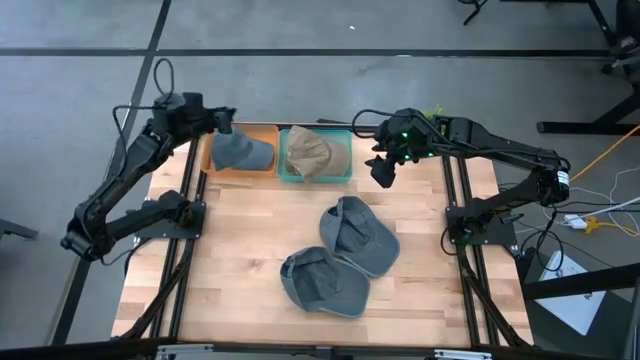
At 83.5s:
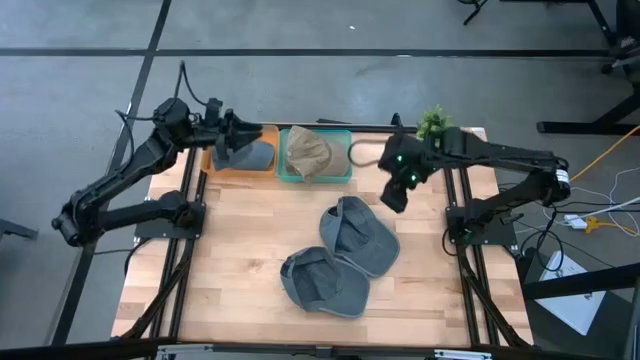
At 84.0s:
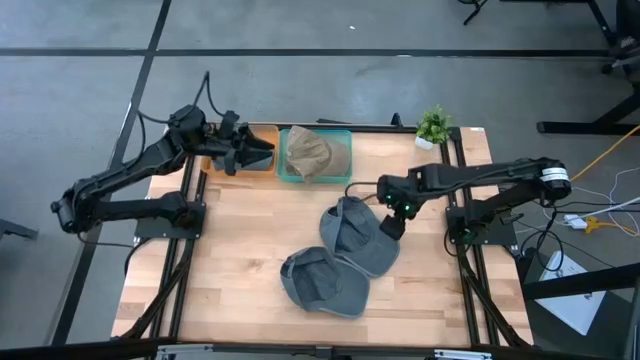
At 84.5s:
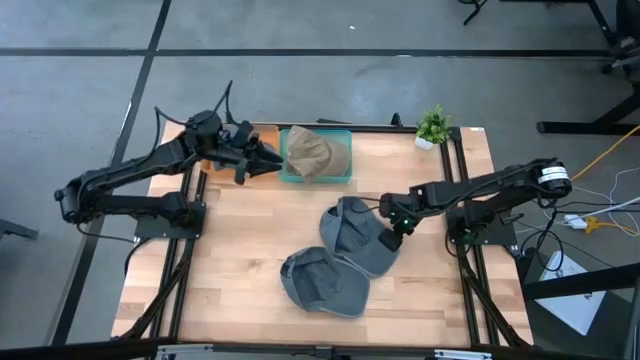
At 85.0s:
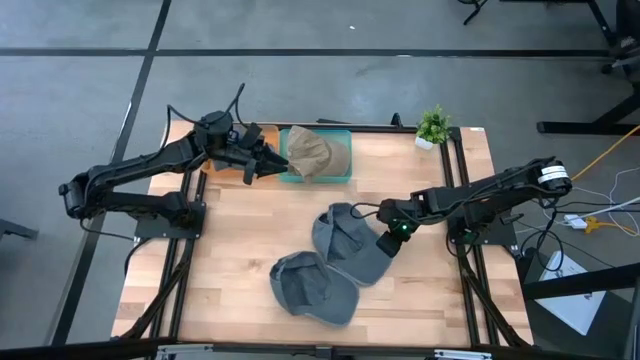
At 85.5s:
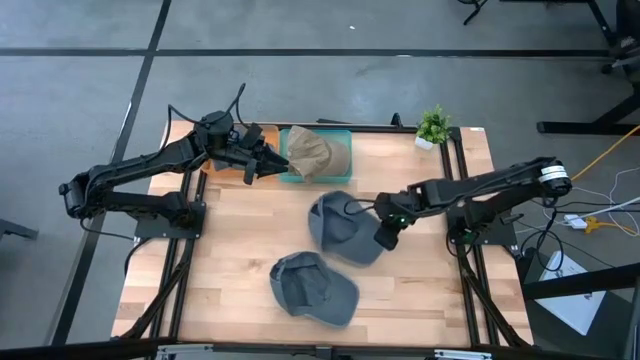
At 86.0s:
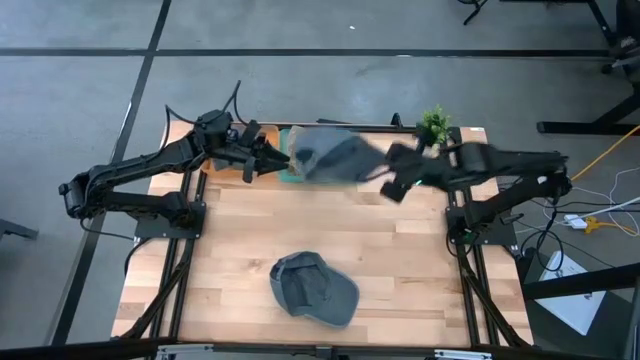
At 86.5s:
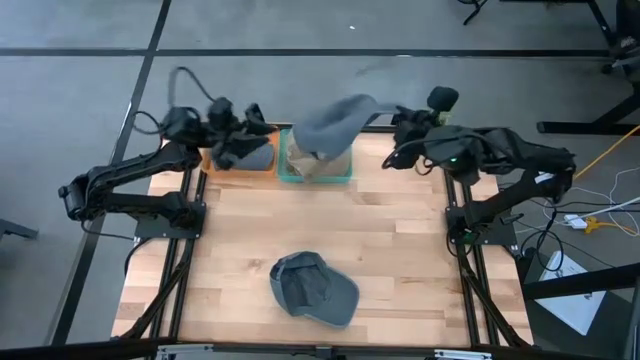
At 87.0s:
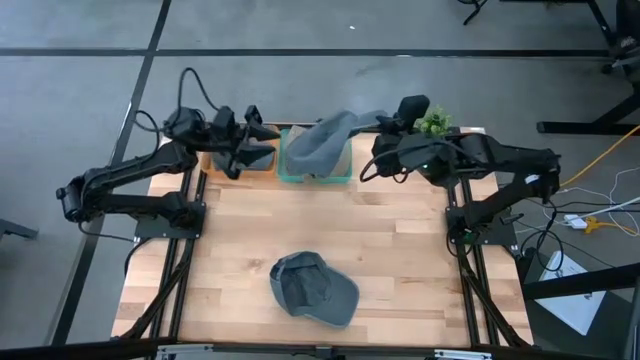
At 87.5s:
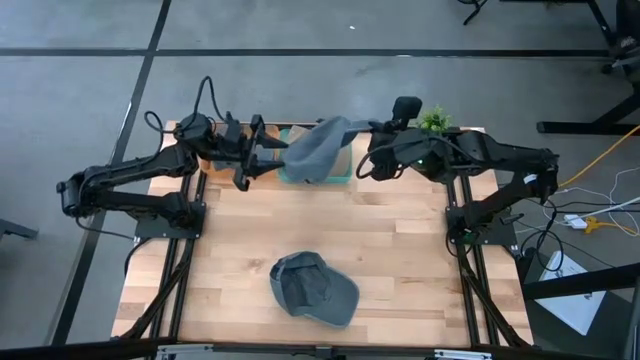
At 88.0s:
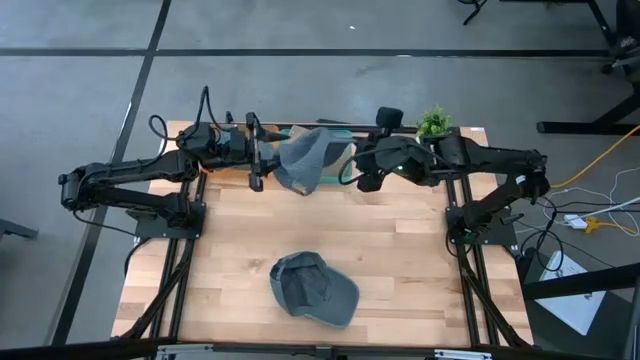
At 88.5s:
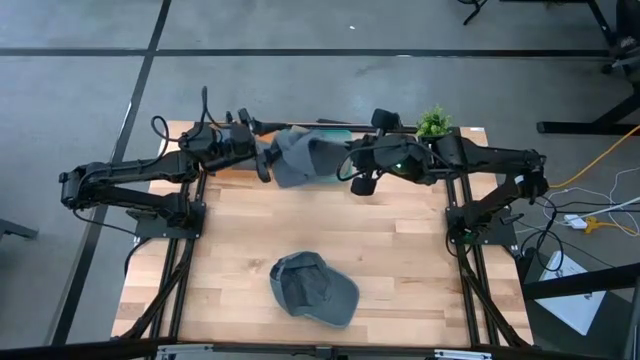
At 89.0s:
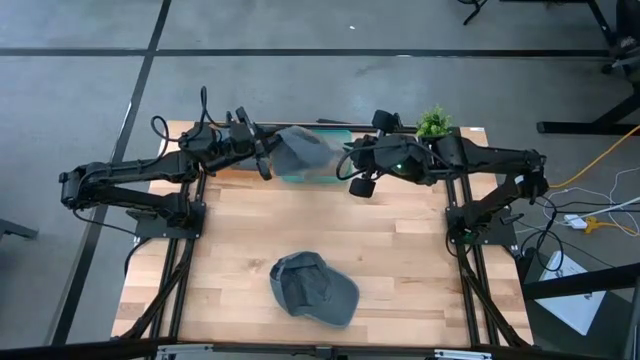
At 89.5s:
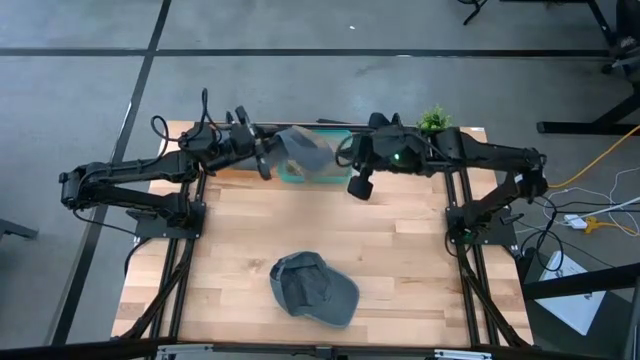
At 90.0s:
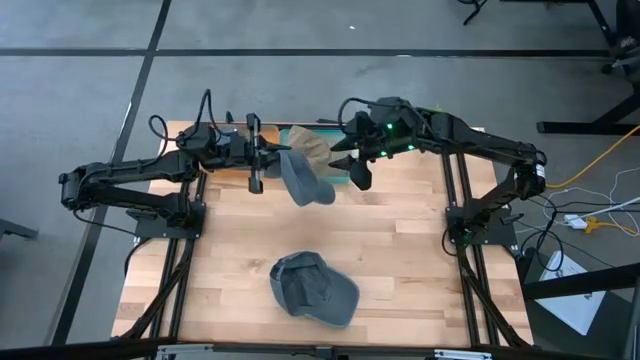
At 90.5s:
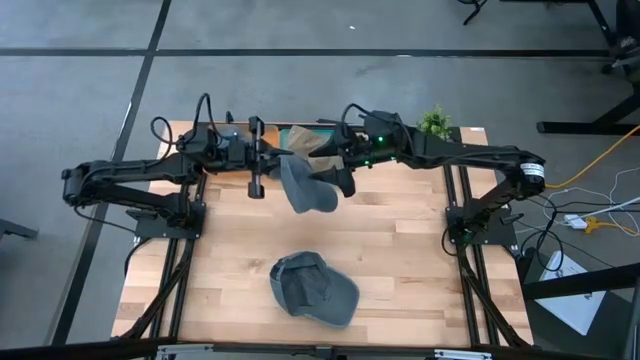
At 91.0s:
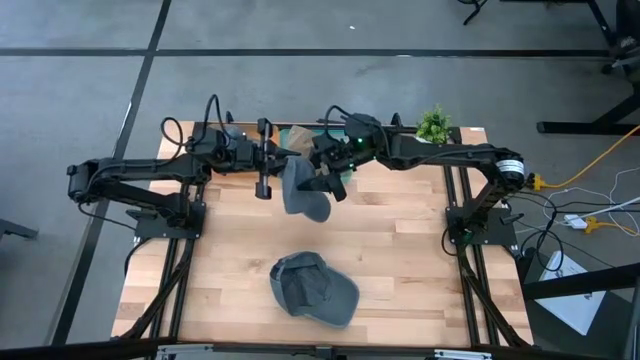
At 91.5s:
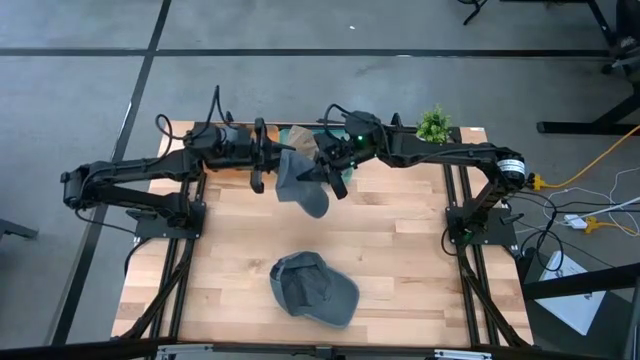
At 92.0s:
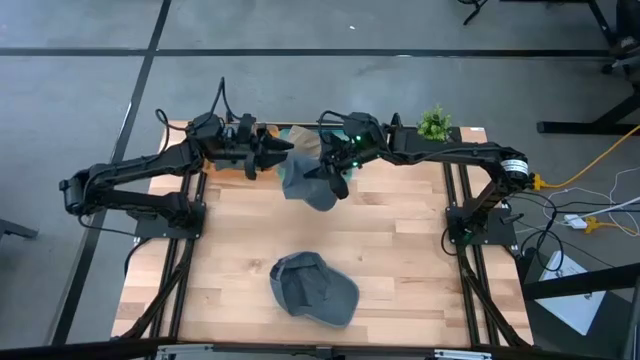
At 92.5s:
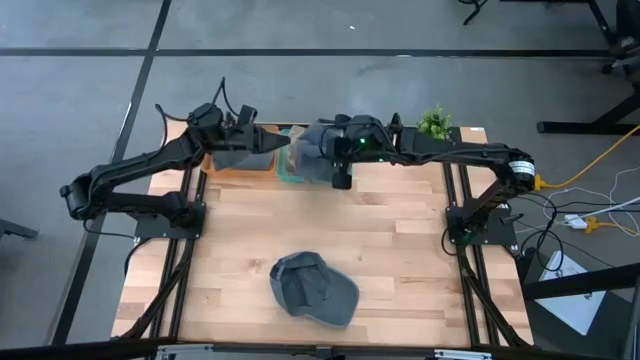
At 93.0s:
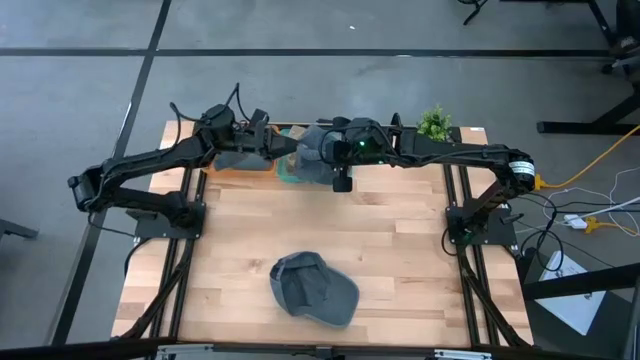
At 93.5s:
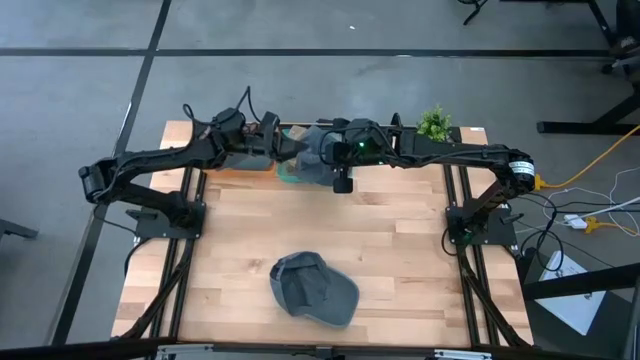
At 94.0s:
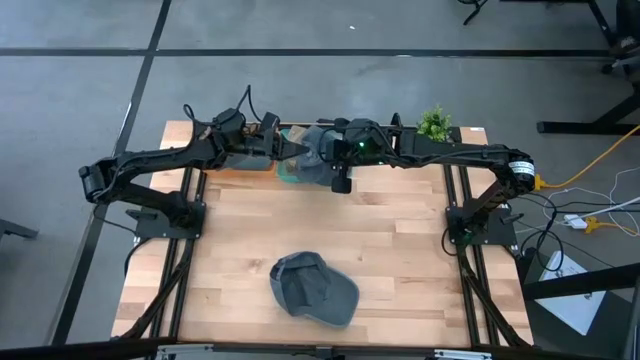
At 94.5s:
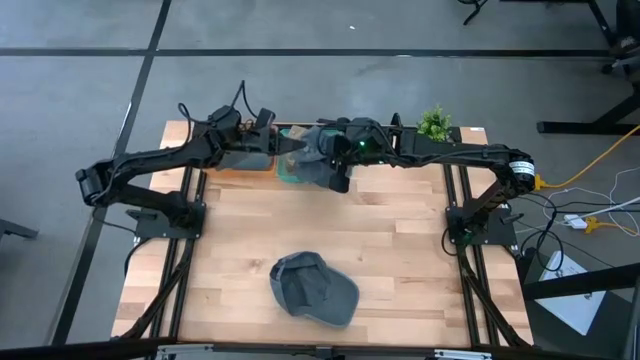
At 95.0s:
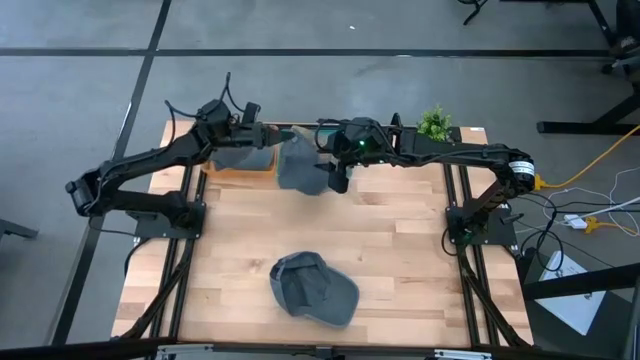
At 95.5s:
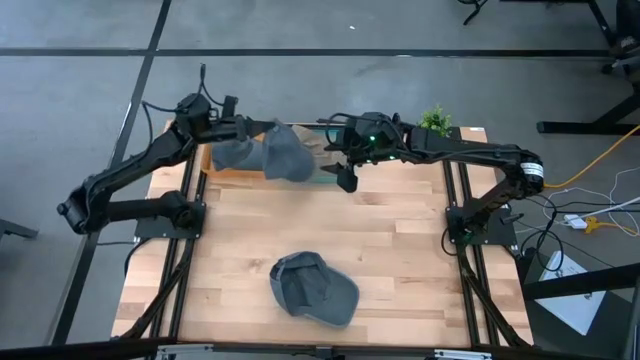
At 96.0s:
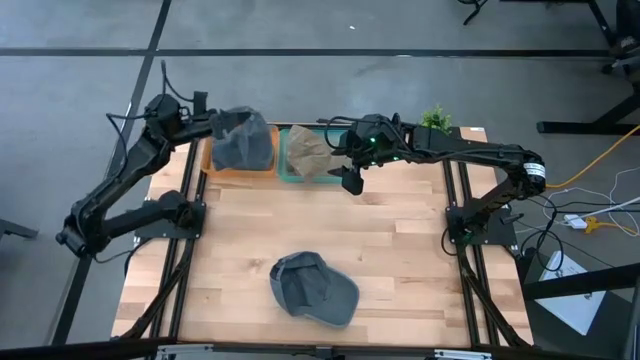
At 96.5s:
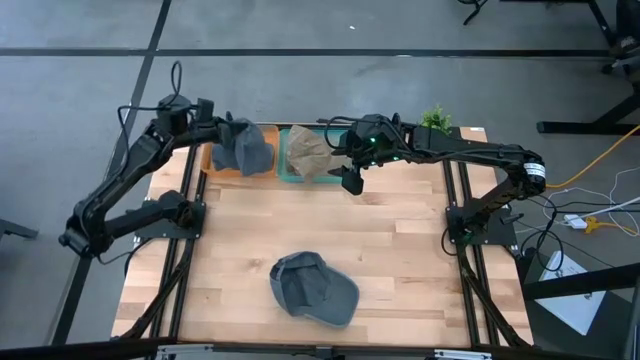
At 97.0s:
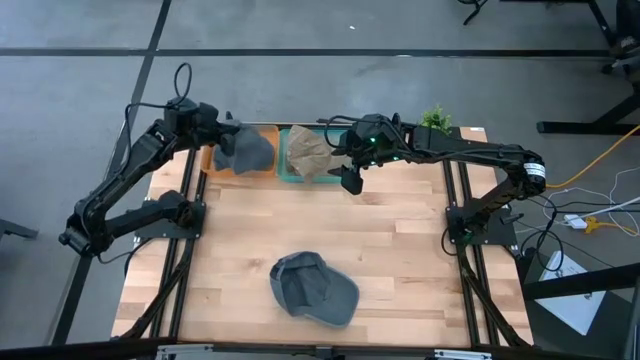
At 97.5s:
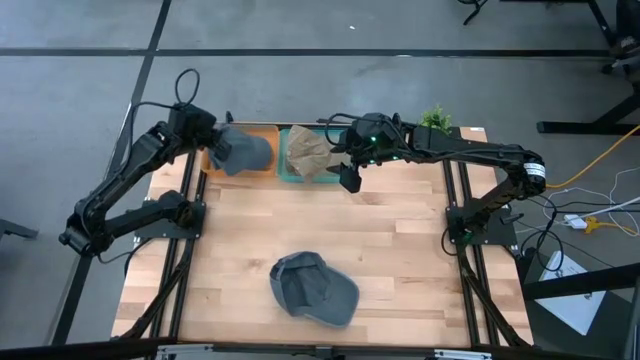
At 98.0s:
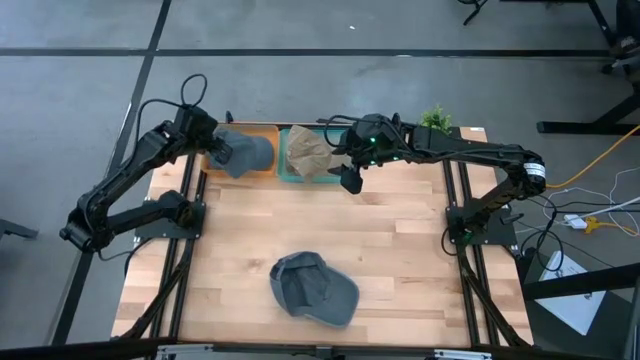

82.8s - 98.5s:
Task: Pick & Place hat
Put the top gray cap into the orange bin

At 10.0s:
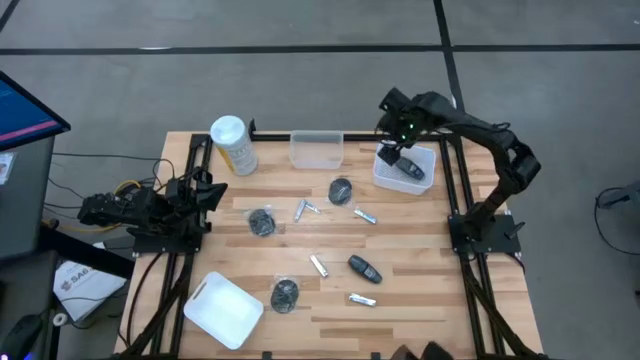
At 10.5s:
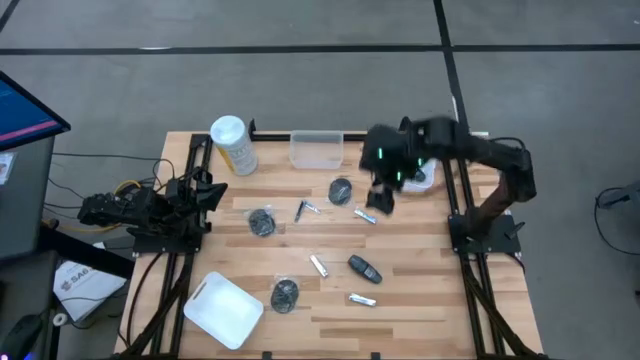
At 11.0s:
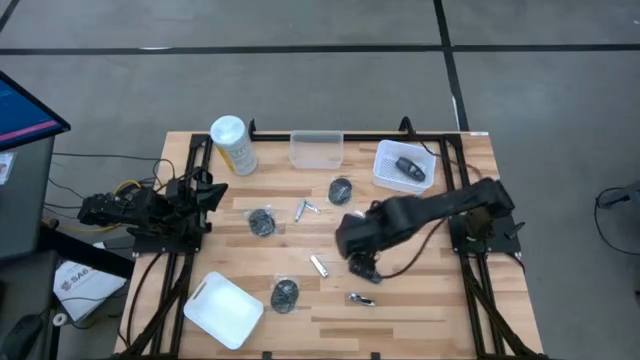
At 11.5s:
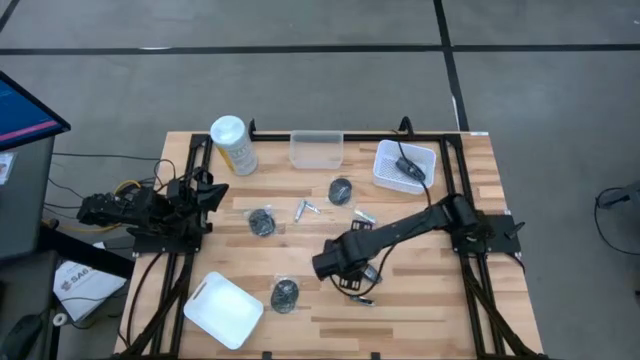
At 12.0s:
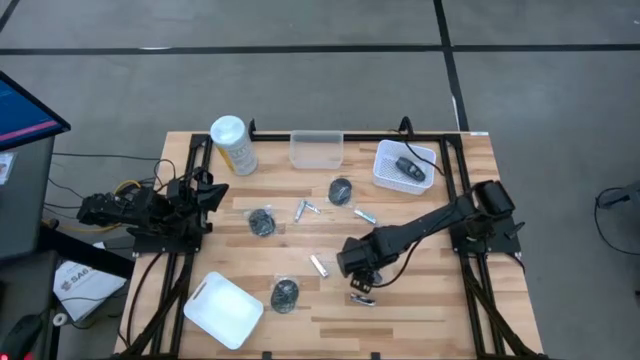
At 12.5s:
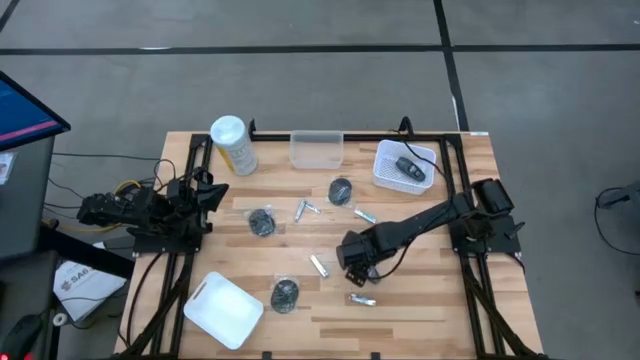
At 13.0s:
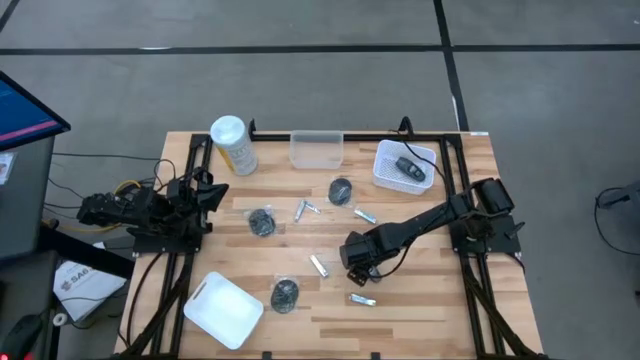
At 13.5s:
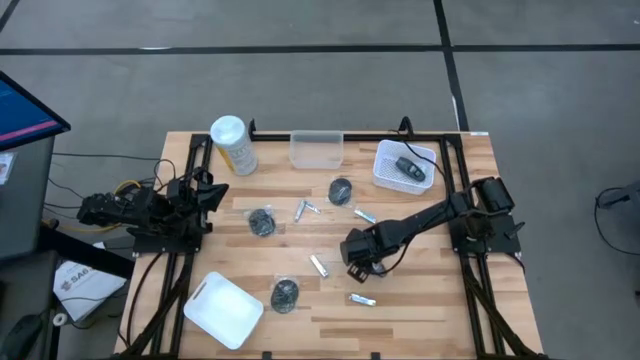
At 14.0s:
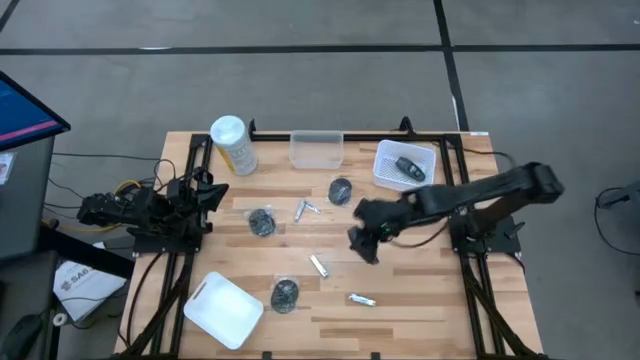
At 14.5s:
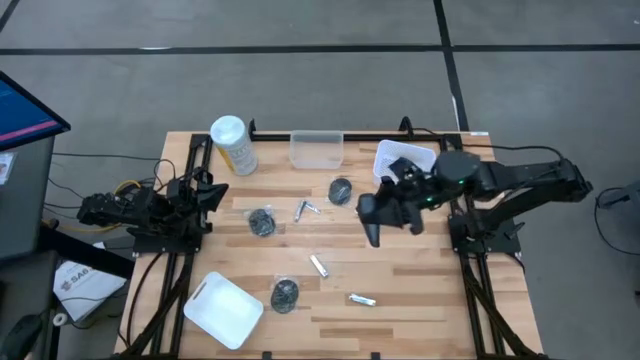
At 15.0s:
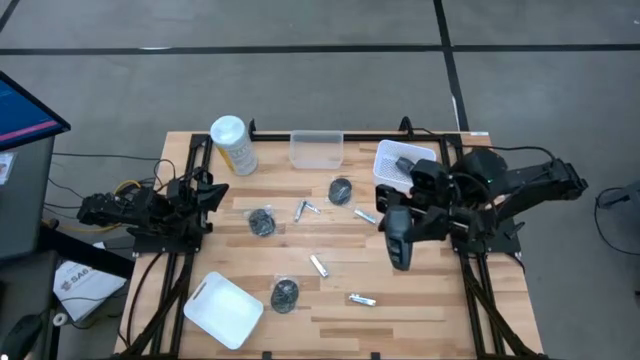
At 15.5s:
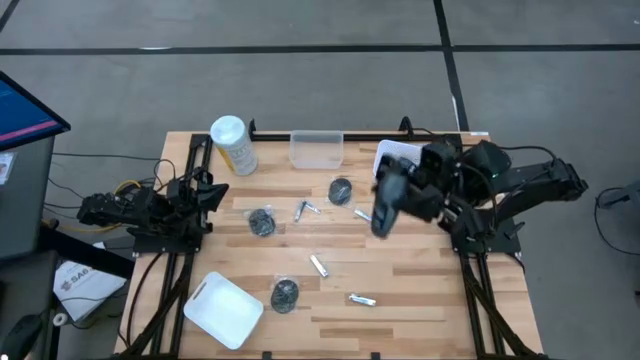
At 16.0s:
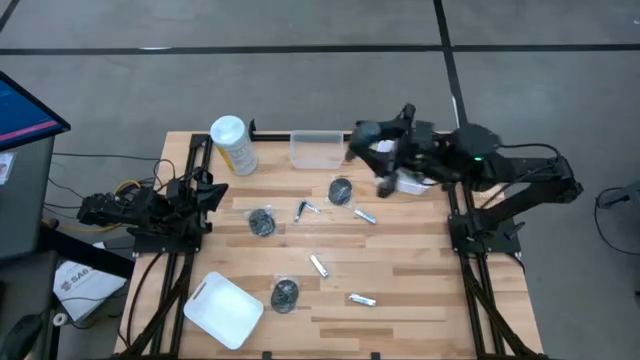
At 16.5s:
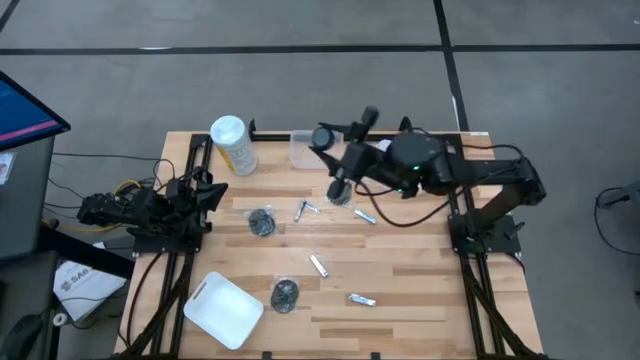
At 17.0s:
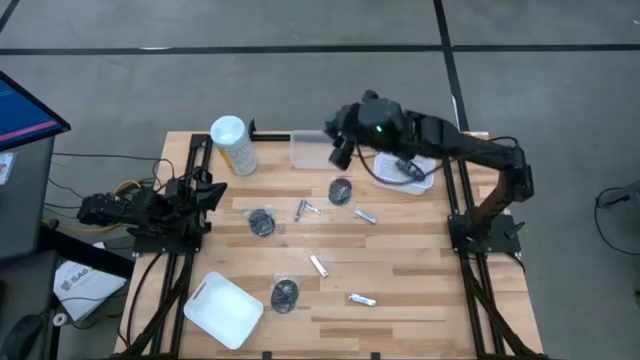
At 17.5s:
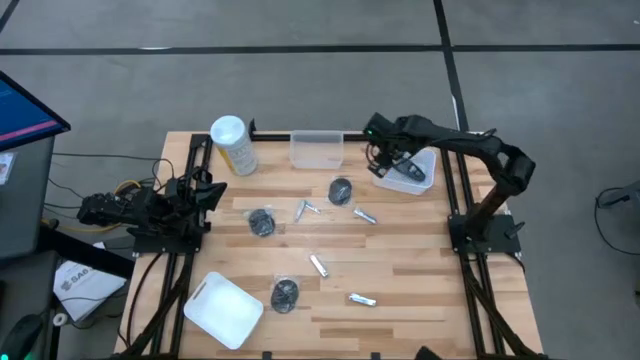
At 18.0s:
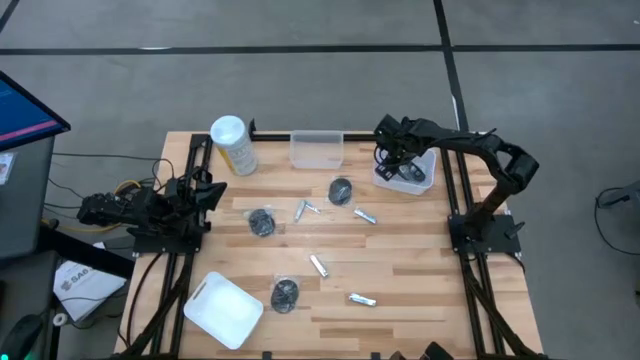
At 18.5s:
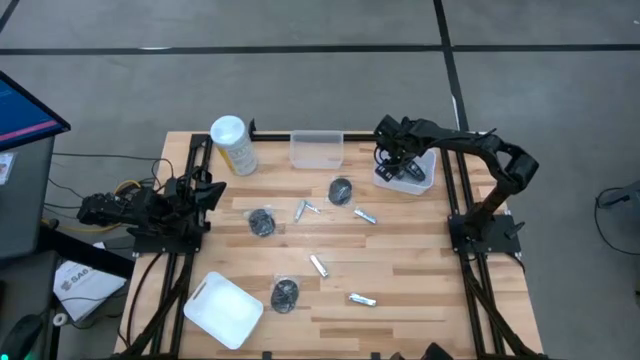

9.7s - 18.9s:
Task: Pick & Place Travel size toiletries
Put the gray deodorant into the white basket
